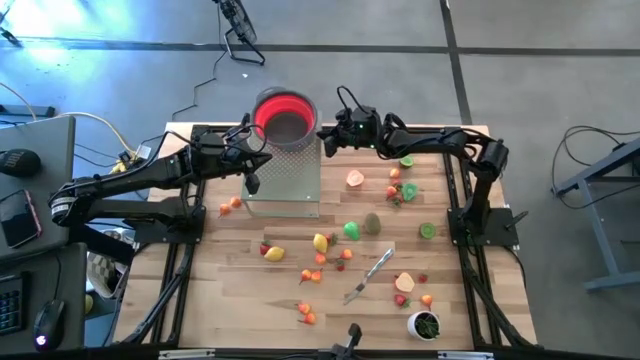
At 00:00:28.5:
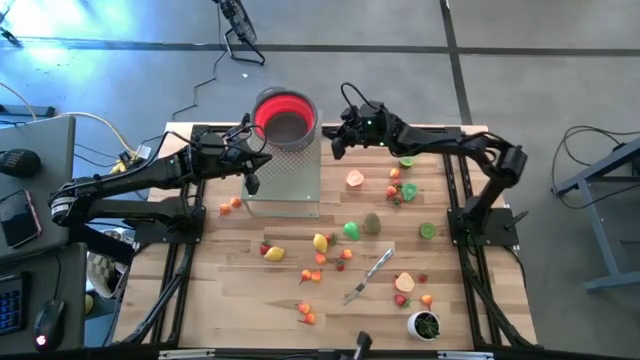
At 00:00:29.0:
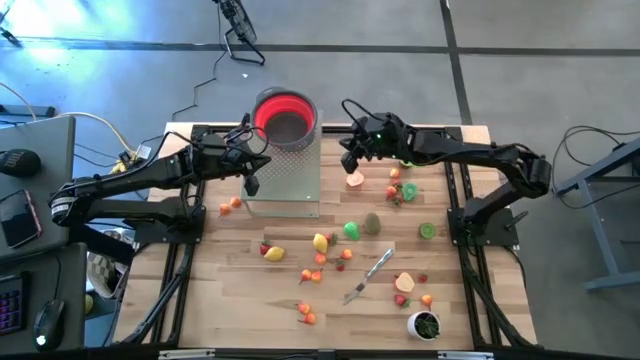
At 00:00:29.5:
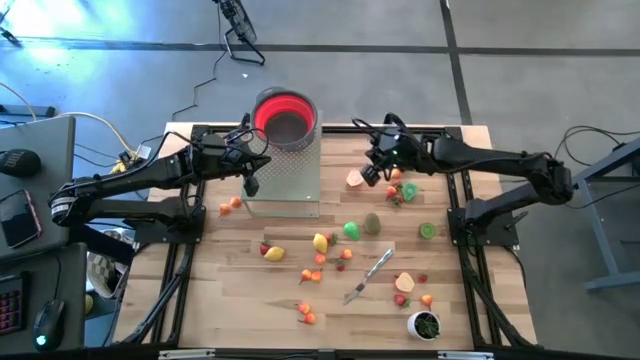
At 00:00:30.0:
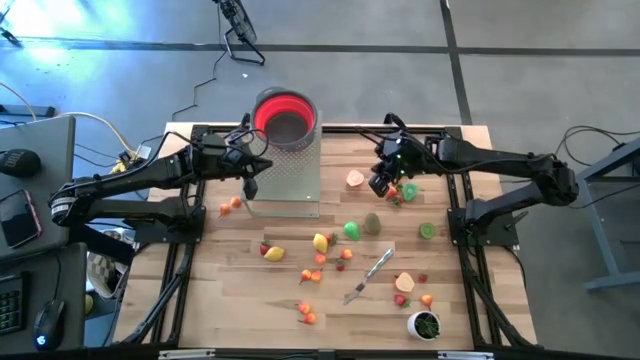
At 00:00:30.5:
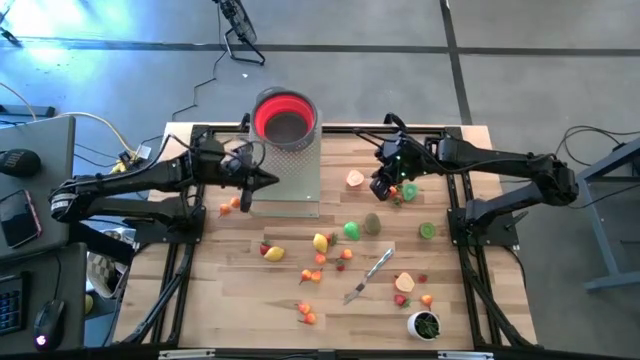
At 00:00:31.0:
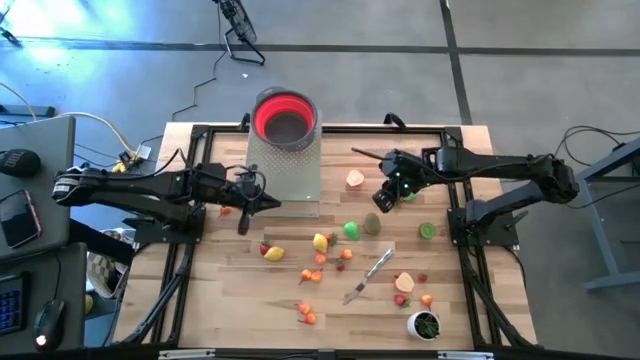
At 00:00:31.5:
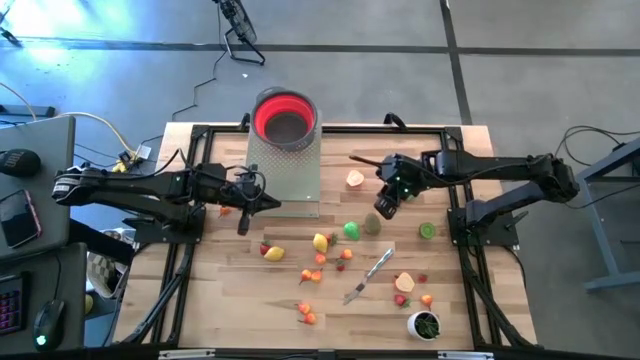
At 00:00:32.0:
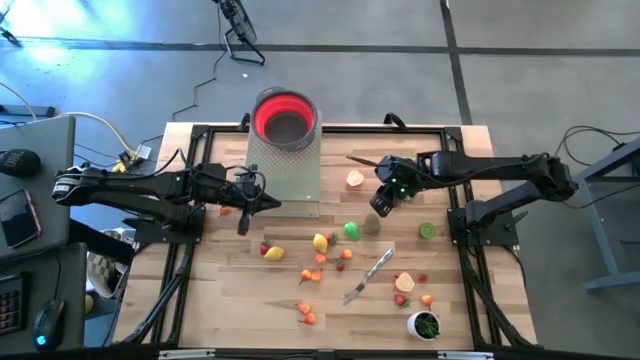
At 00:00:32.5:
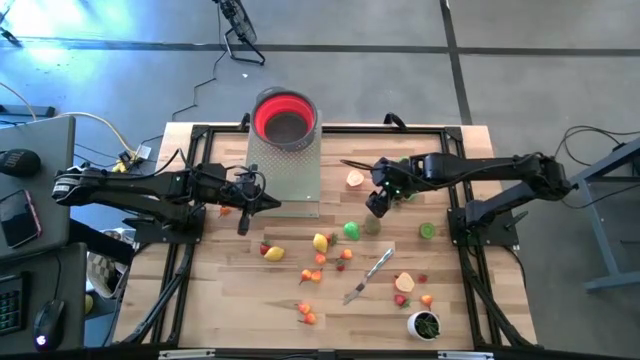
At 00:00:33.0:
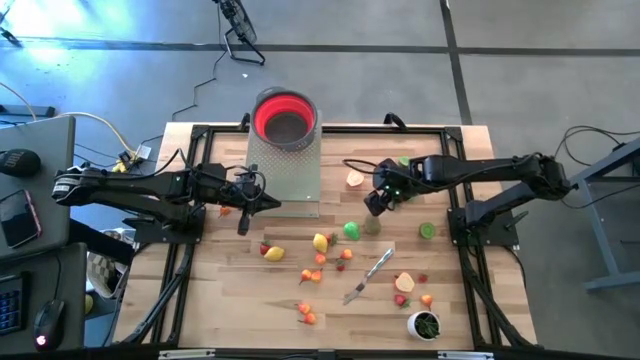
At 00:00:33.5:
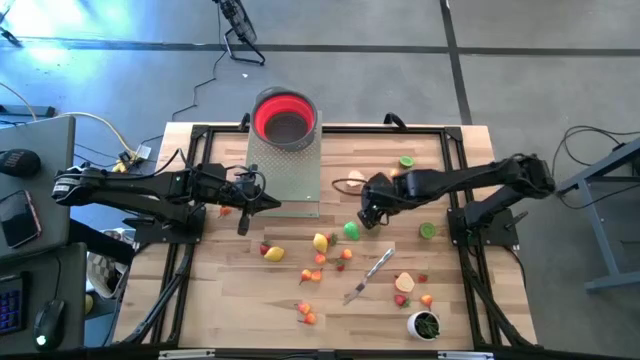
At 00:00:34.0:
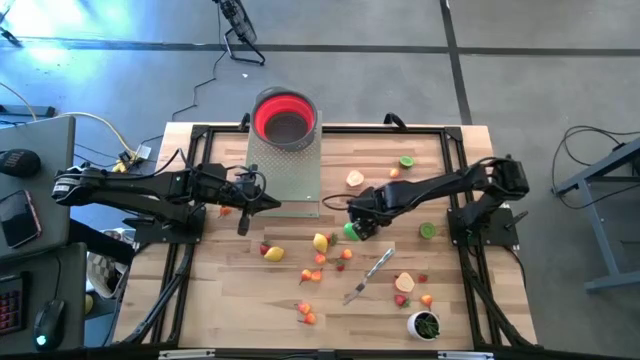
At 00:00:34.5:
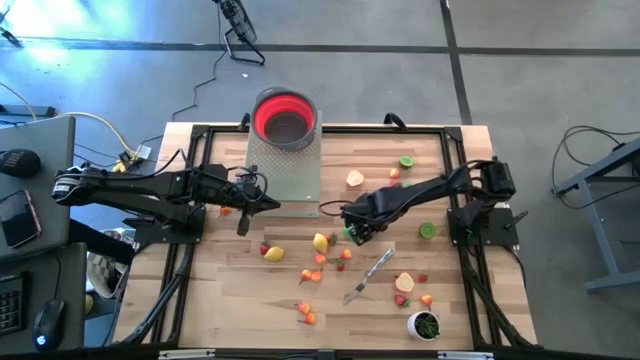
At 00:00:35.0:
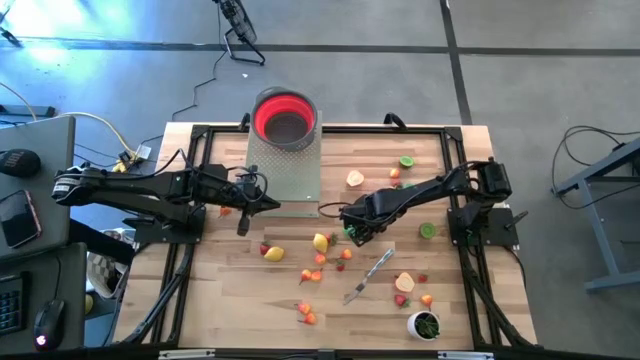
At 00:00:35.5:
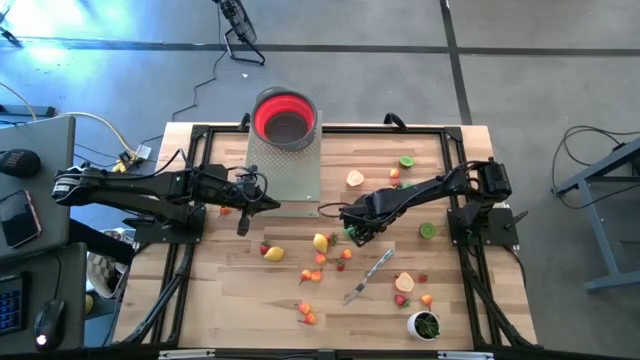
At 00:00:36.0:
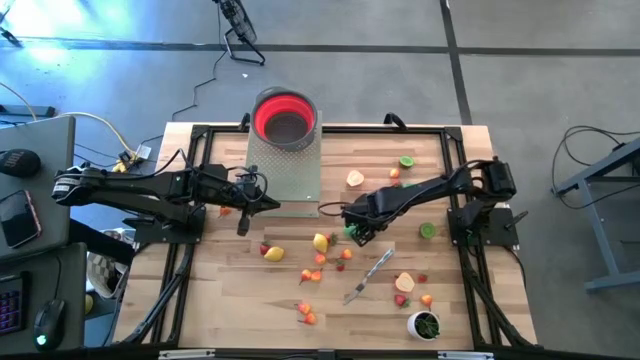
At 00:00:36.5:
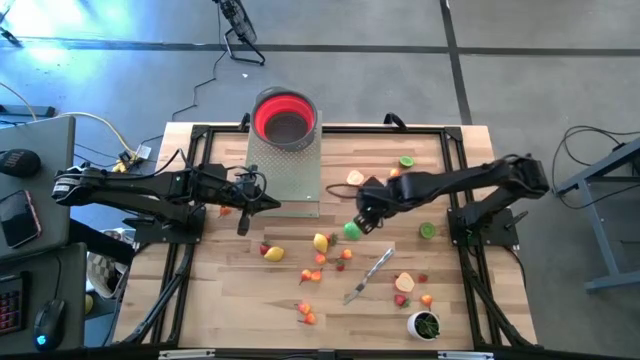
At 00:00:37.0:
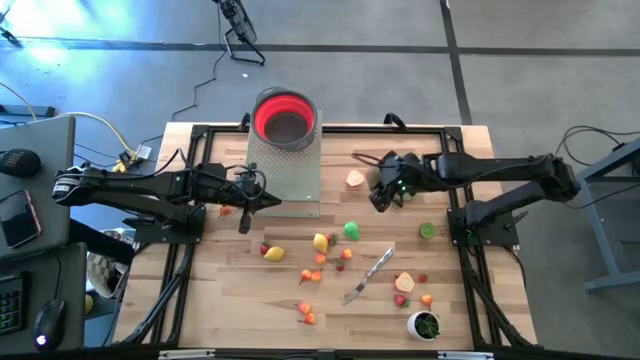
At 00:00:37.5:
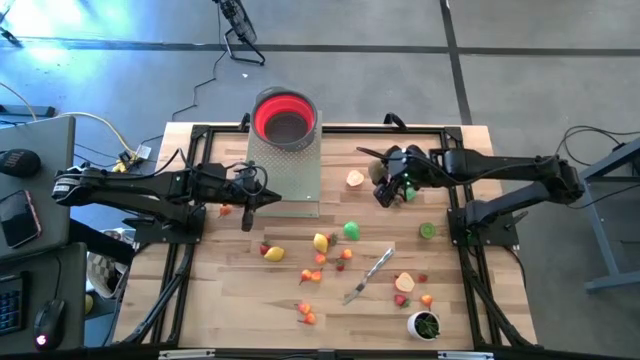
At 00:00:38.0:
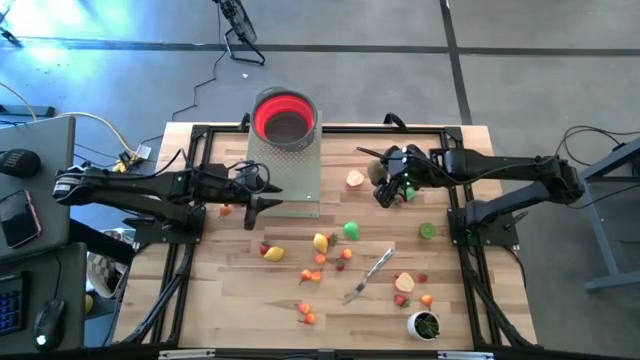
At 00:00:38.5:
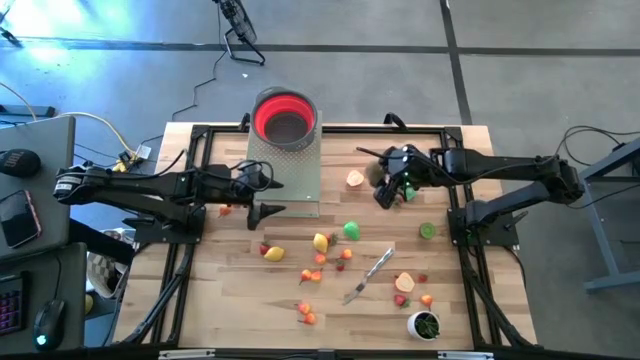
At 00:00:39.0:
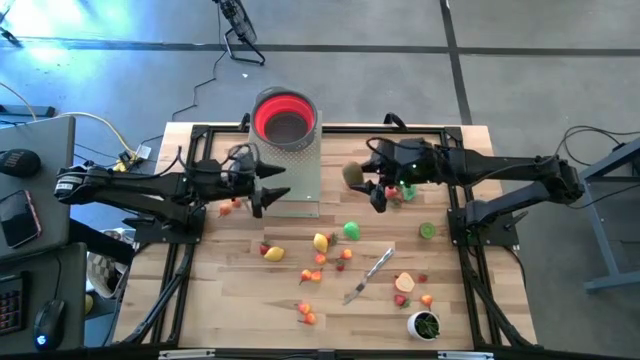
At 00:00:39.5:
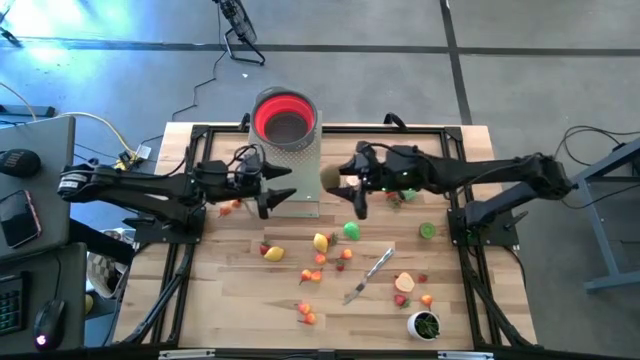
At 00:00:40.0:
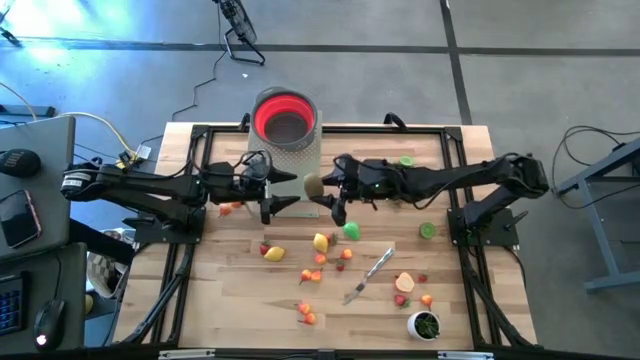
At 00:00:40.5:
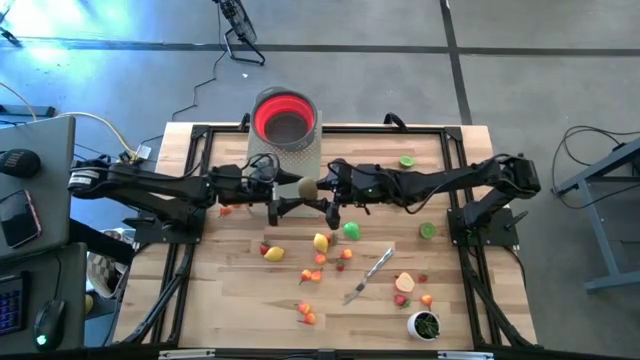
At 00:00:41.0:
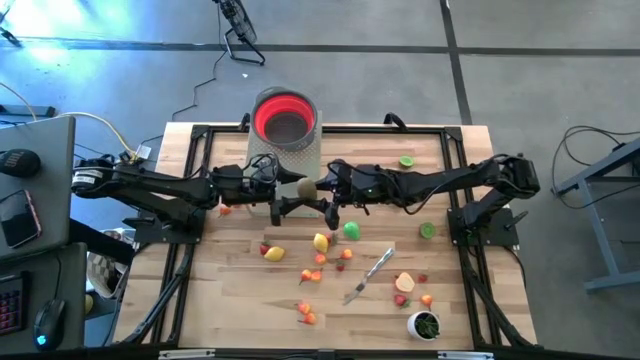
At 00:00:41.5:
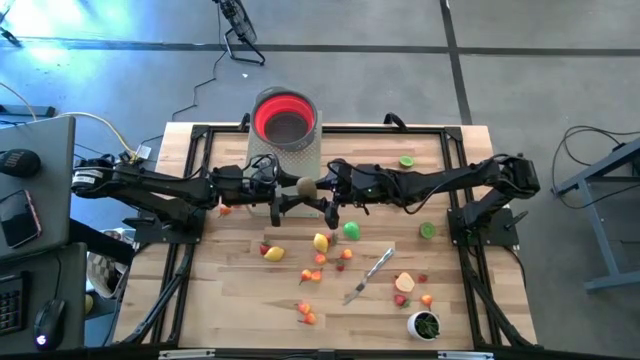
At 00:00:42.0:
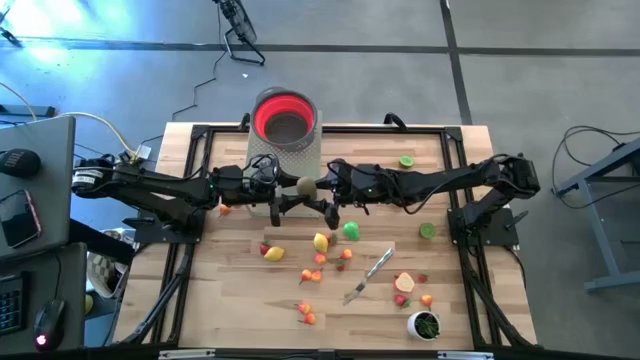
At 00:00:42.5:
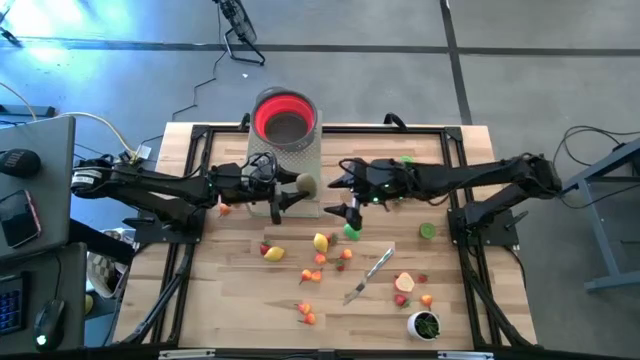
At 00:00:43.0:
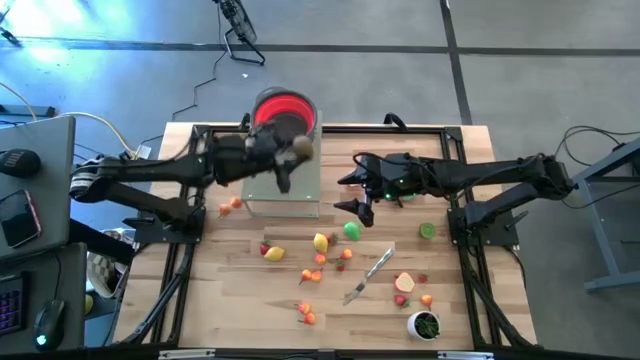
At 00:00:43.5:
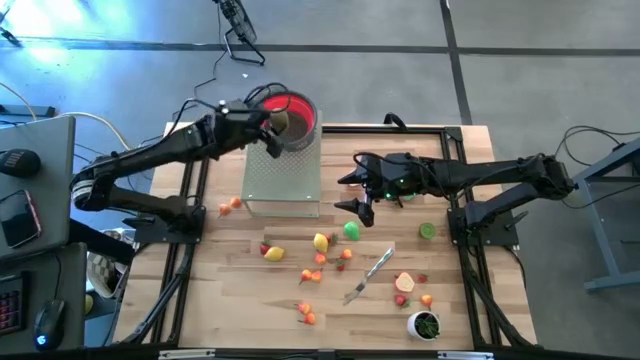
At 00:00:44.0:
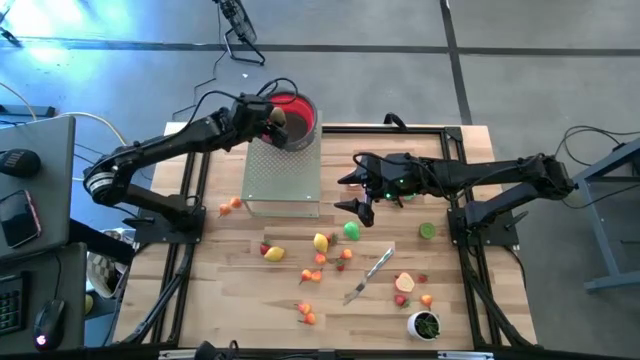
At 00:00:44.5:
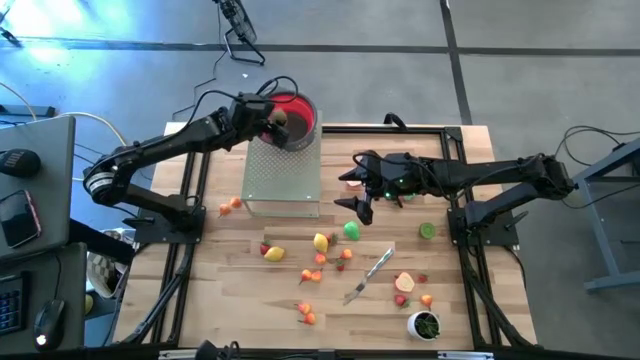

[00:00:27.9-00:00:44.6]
Task: Pick & Place Fruit
Put the kiwi into the red strainer on the shelf

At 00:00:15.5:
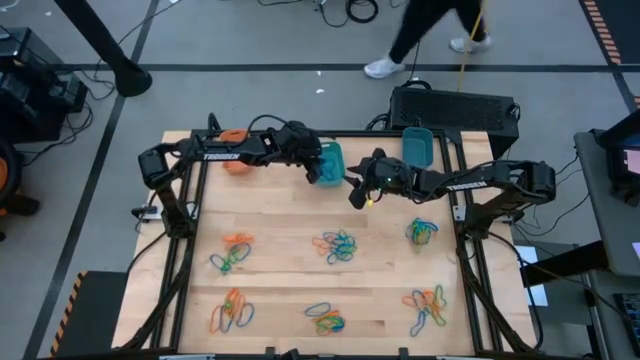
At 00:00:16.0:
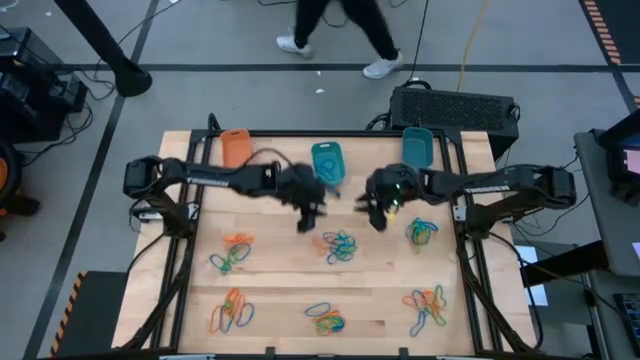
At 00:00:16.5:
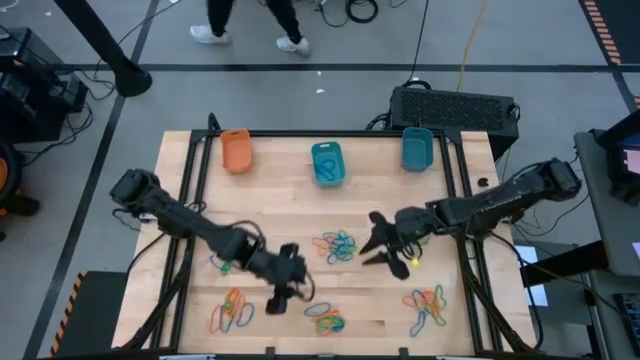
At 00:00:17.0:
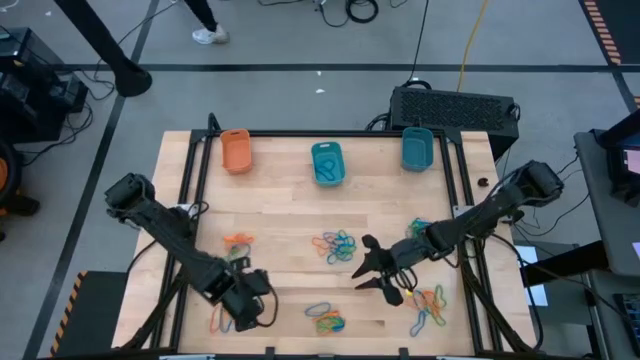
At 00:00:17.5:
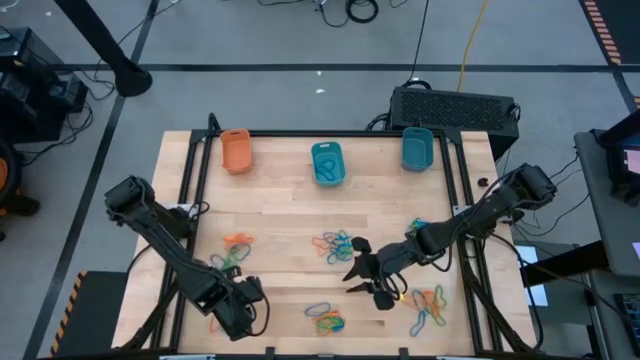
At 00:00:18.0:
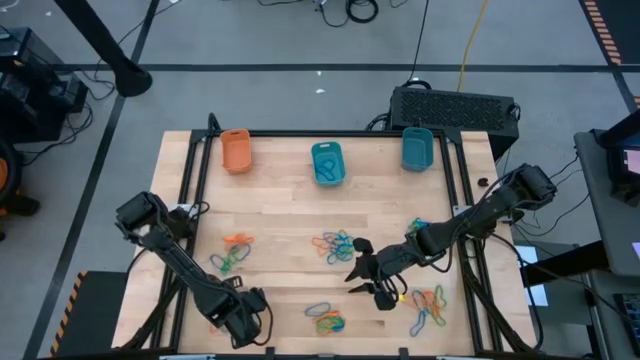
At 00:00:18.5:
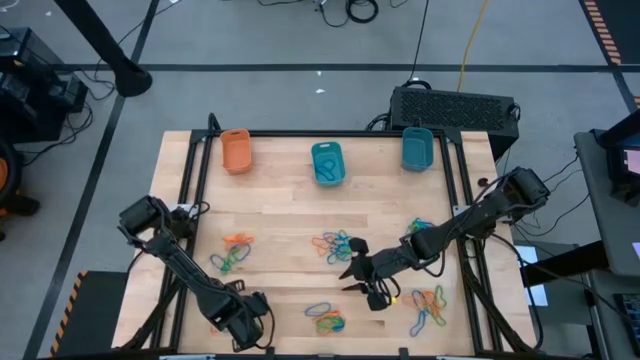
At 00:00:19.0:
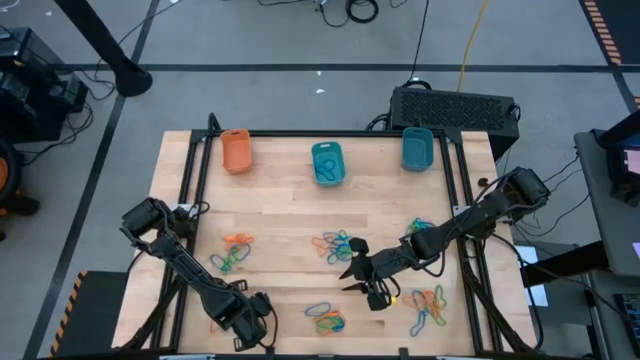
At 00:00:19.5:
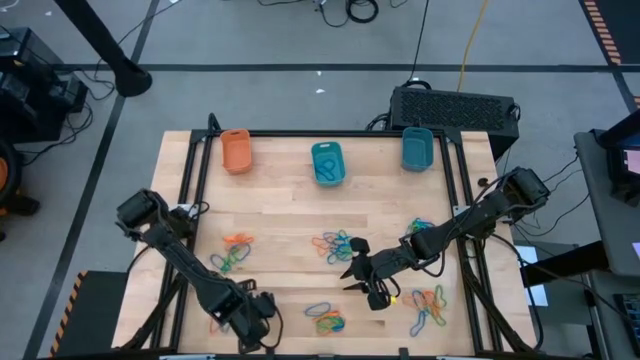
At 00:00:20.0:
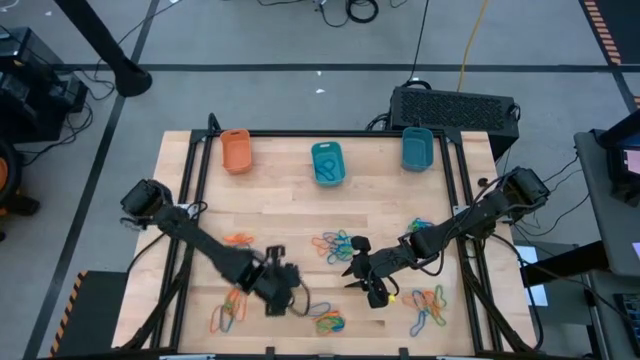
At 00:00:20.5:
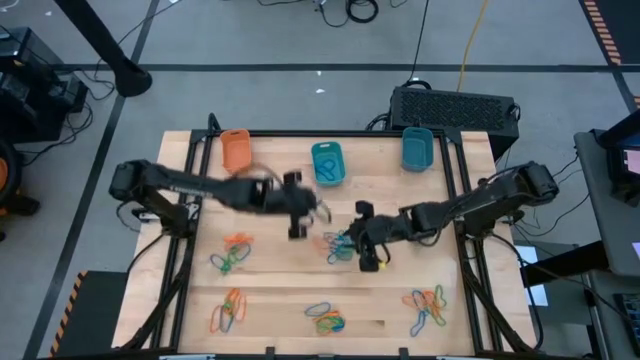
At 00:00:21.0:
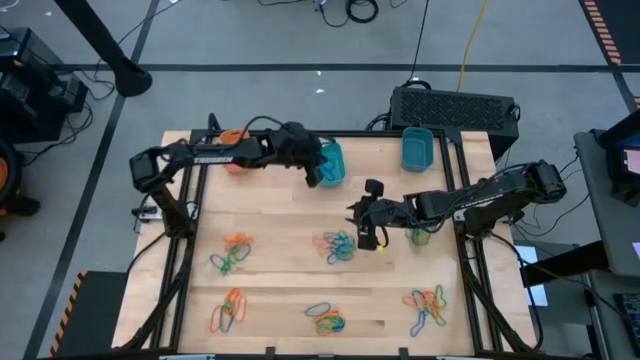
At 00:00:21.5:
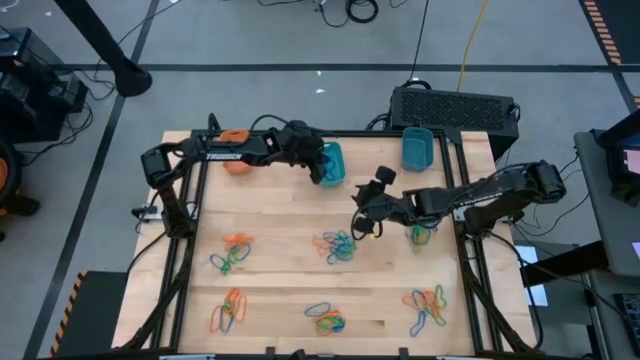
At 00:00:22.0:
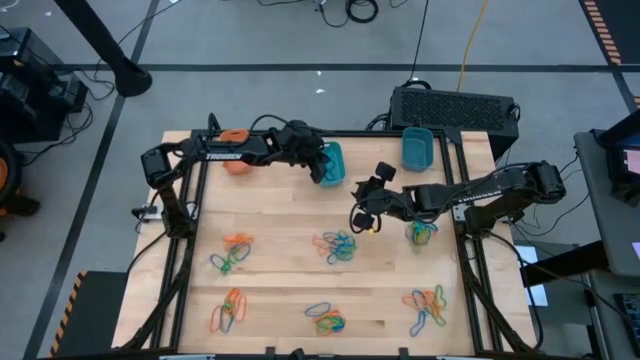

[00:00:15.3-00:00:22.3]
Task: Sort rubber bands into baskets
Put the blue rubber band into the light blue bin
